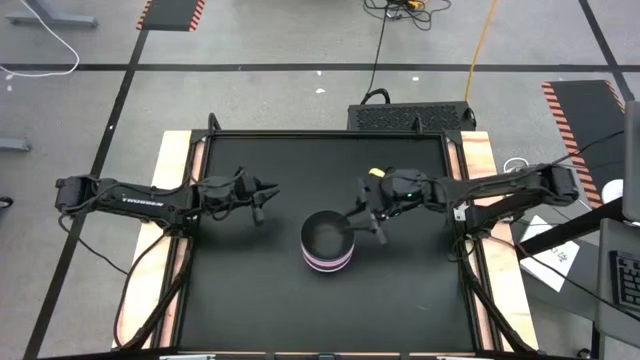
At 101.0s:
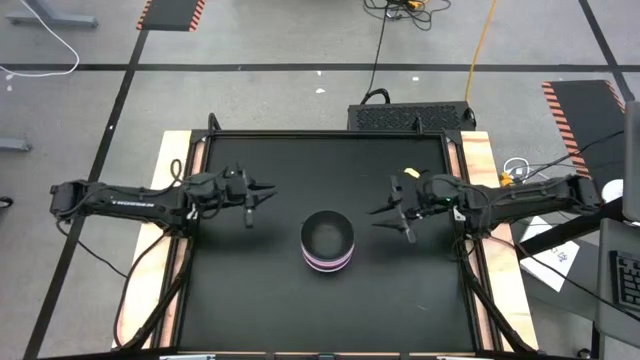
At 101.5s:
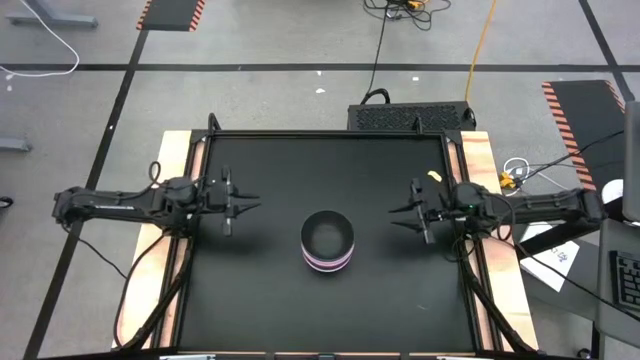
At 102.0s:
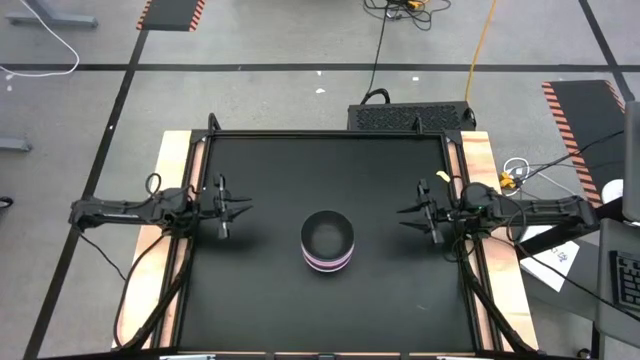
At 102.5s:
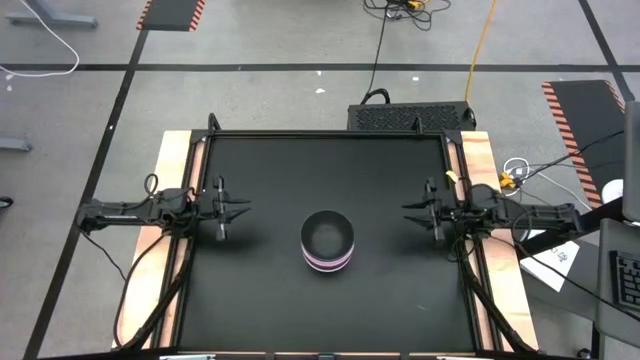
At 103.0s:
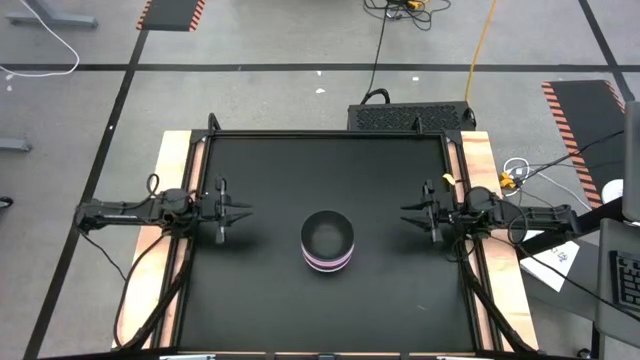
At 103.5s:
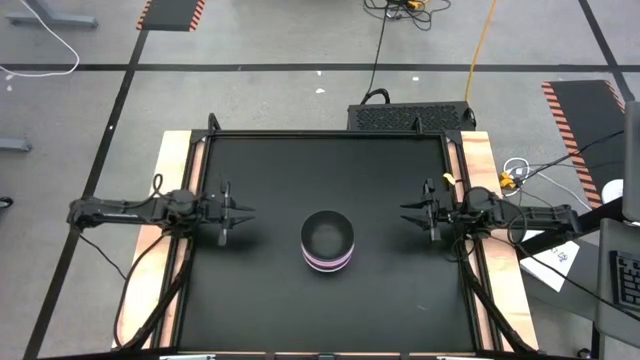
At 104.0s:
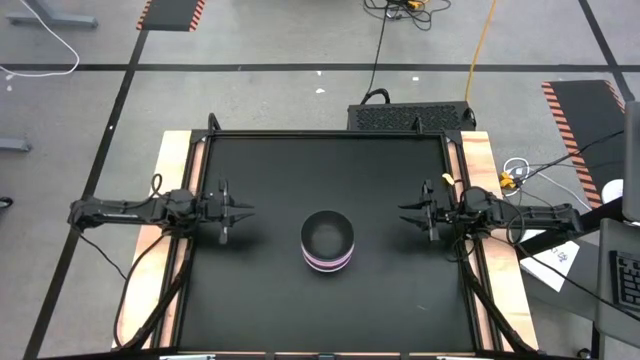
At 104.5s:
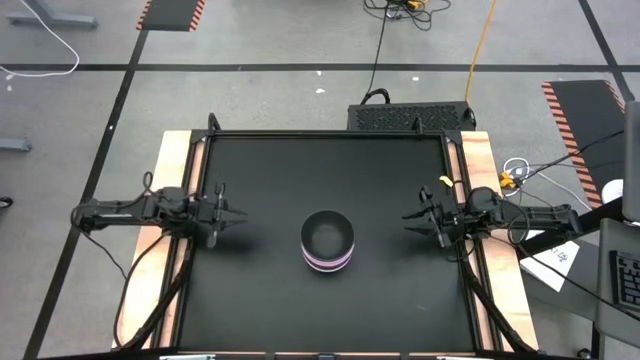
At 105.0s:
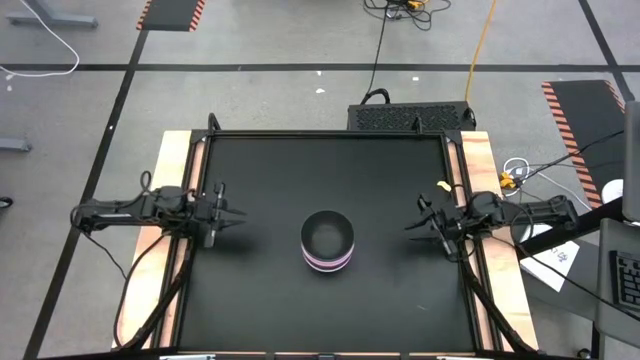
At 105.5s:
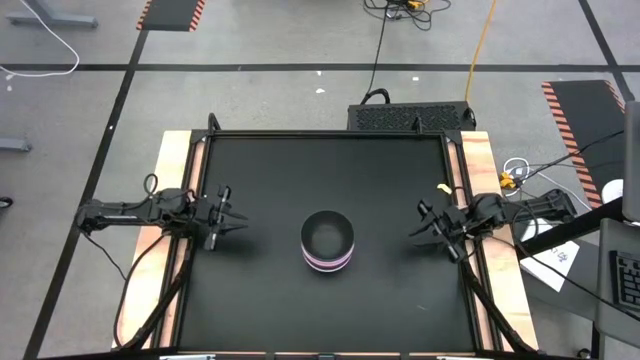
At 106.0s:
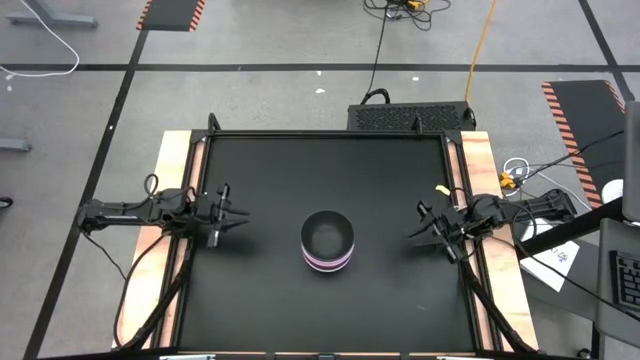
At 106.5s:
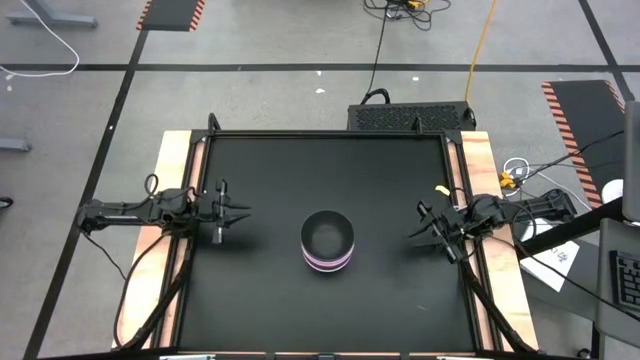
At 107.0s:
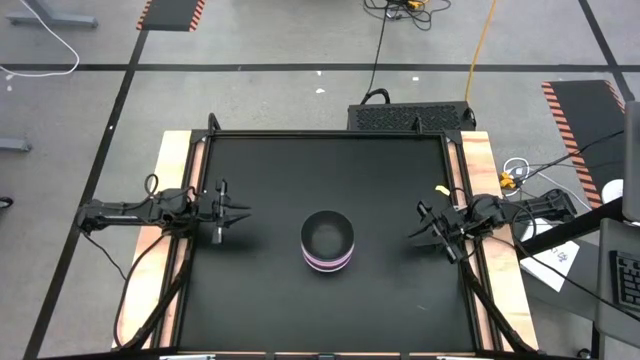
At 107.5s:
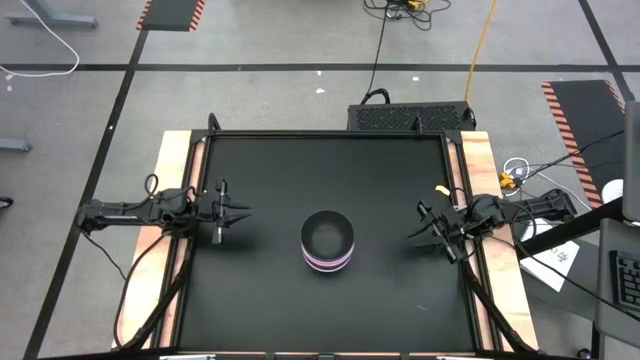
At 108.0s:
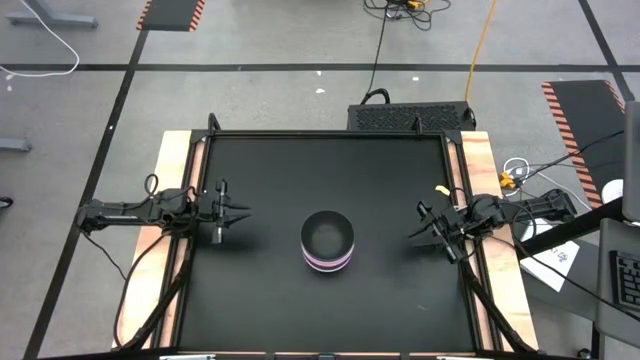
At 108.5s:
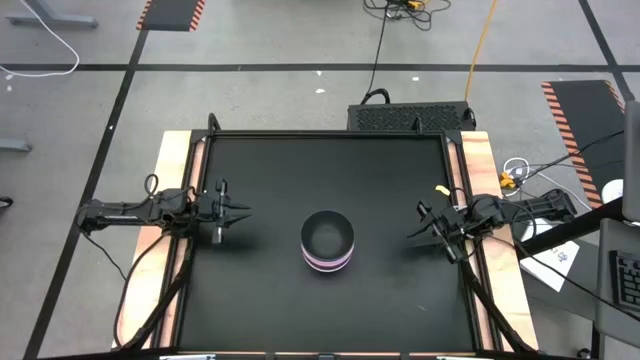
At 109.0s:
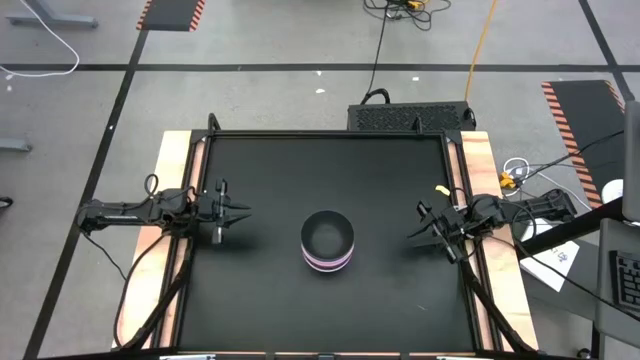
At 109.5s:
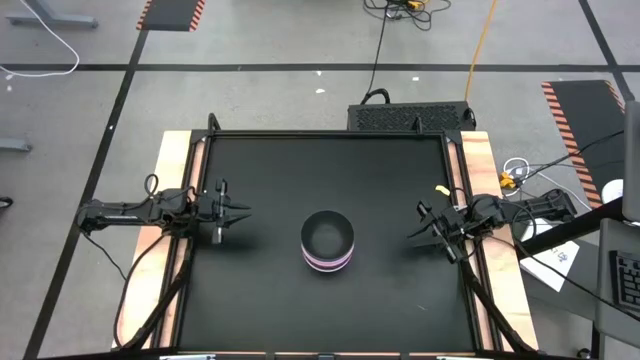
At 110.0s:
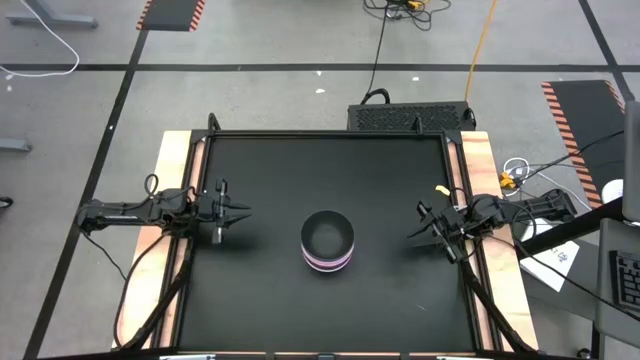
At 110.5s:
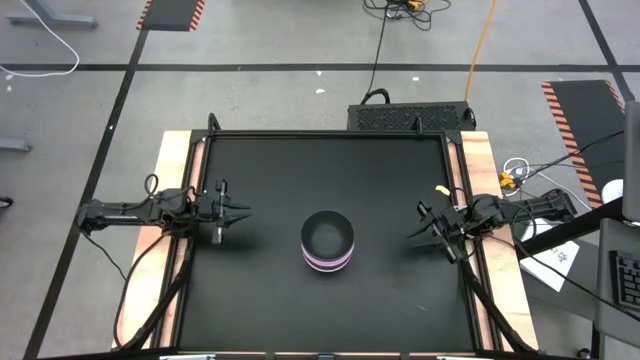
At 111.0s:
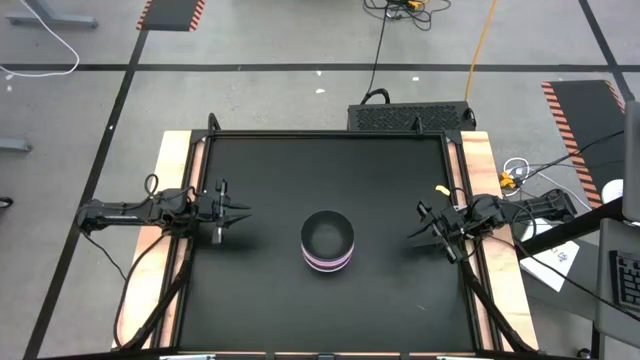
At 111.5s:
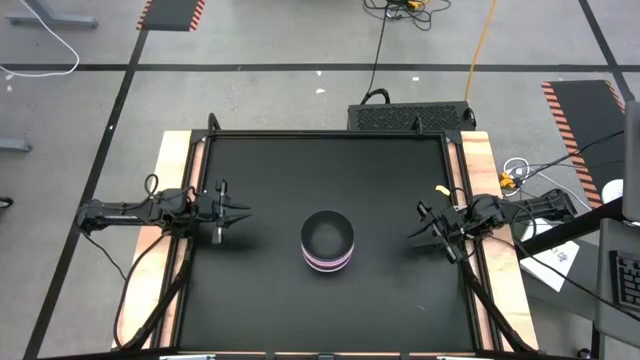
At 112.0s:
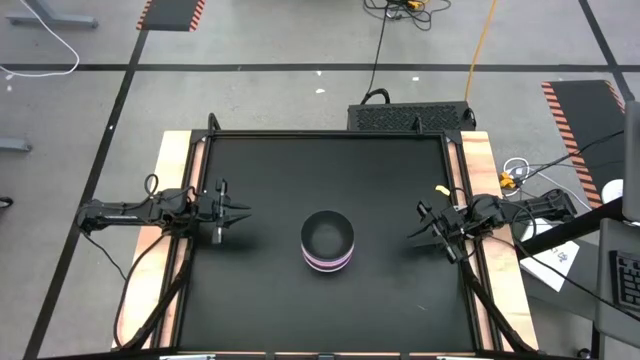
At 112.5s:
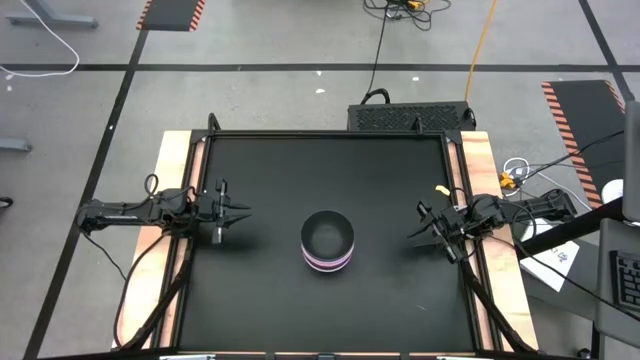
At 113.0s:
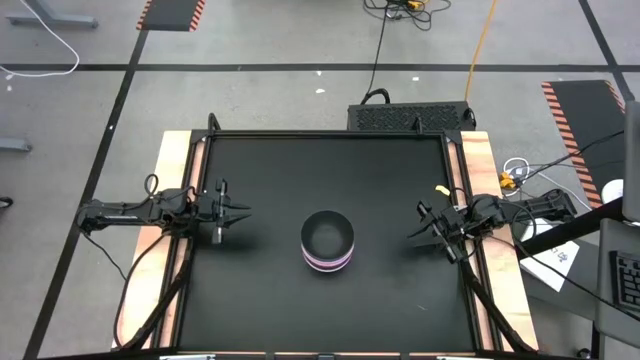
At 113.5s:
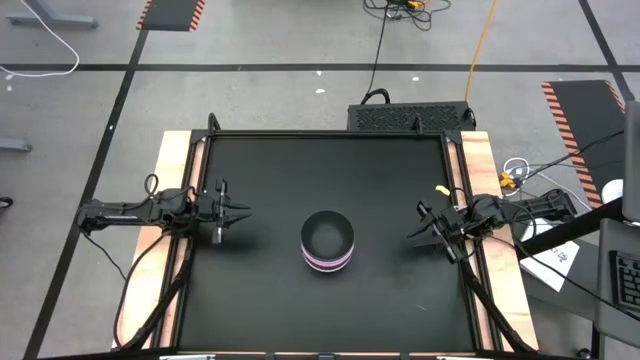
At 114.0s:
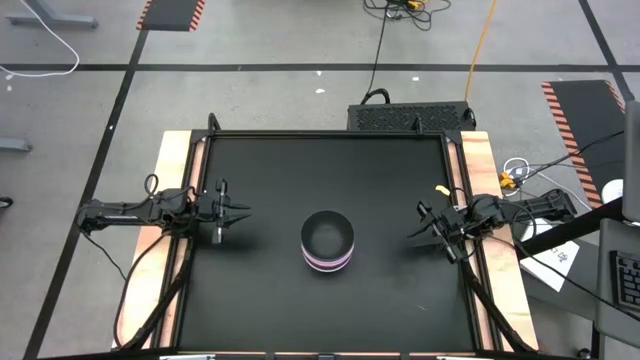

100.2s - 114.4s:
Task: Nest bowls inside each other
Return to Home Position

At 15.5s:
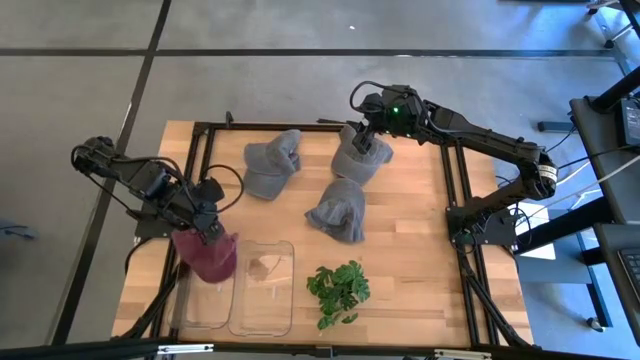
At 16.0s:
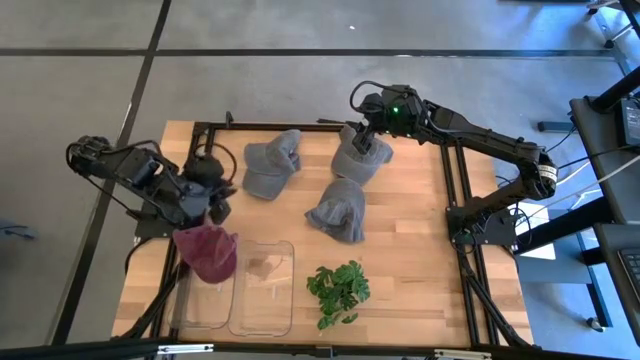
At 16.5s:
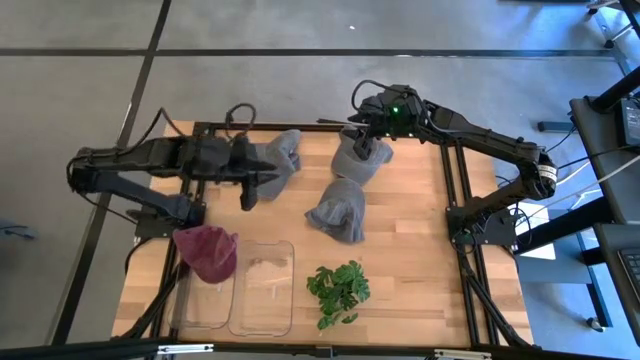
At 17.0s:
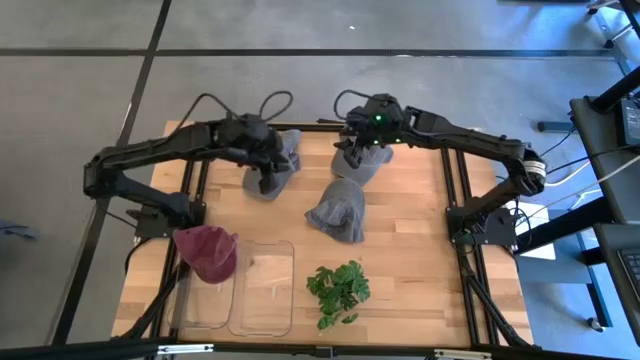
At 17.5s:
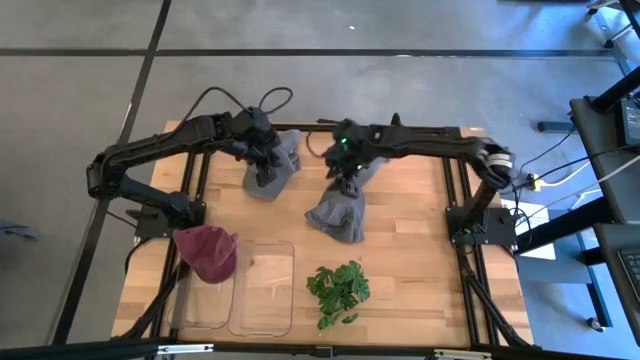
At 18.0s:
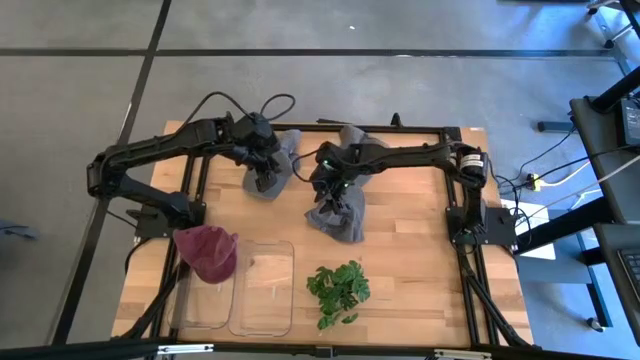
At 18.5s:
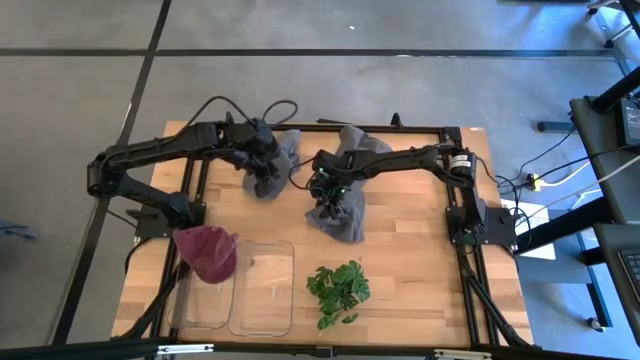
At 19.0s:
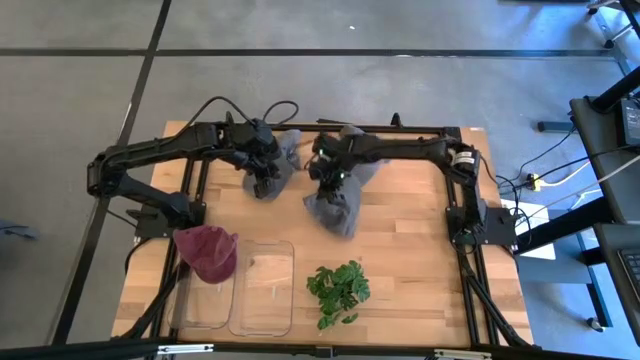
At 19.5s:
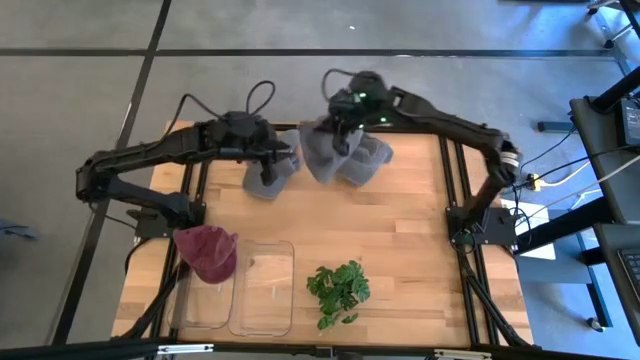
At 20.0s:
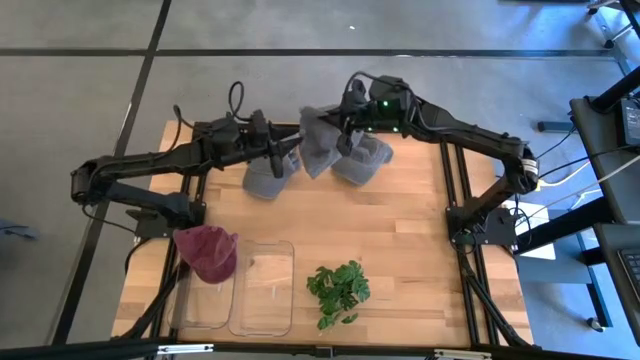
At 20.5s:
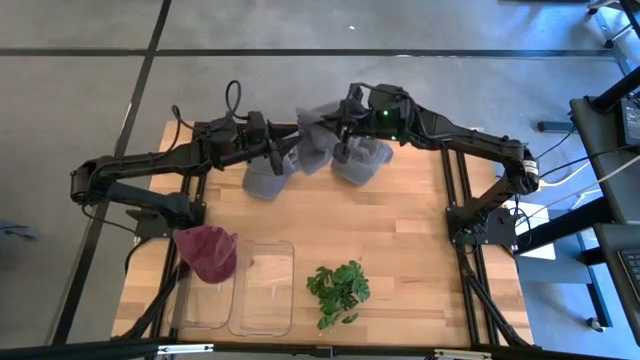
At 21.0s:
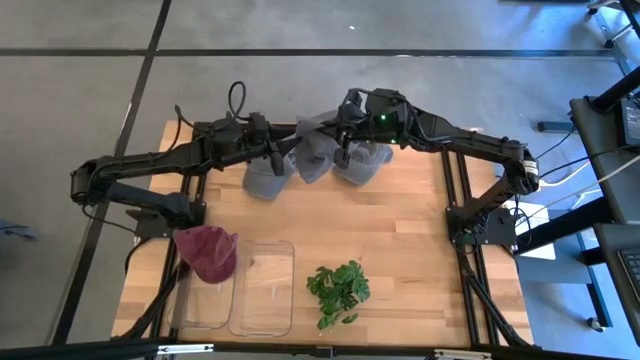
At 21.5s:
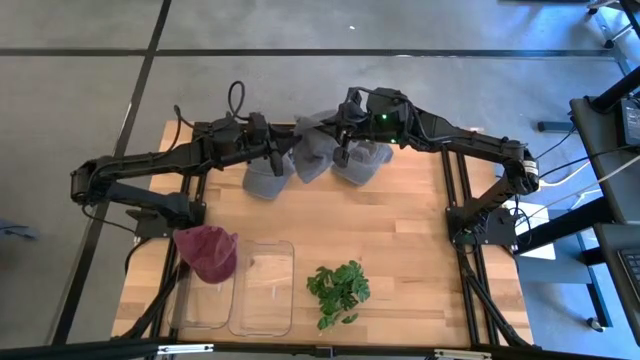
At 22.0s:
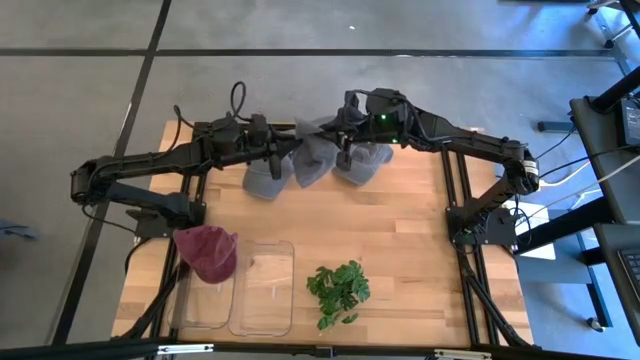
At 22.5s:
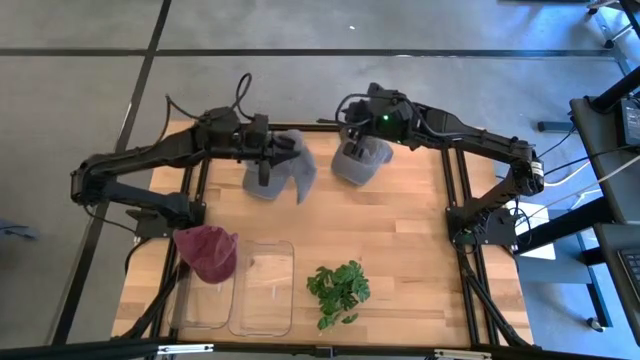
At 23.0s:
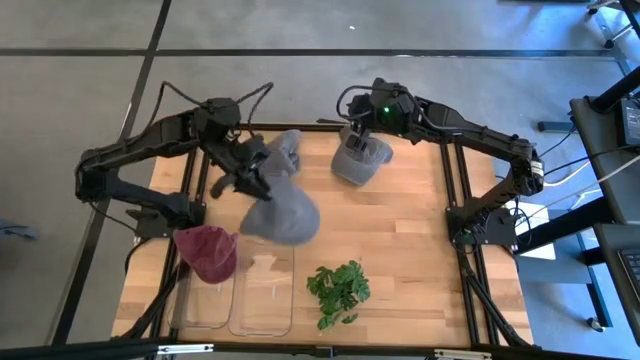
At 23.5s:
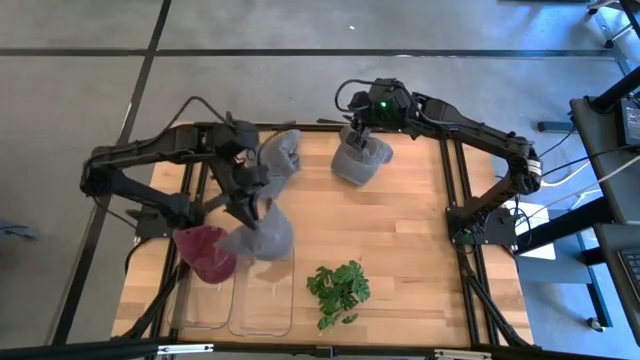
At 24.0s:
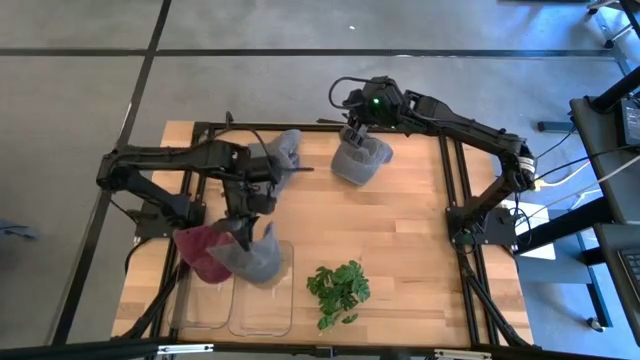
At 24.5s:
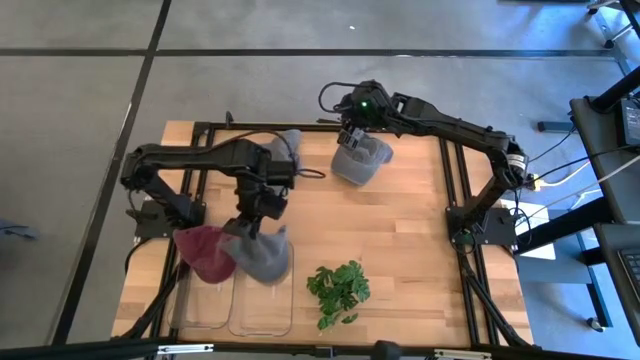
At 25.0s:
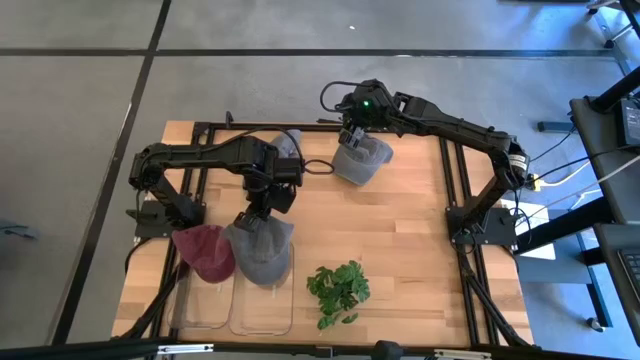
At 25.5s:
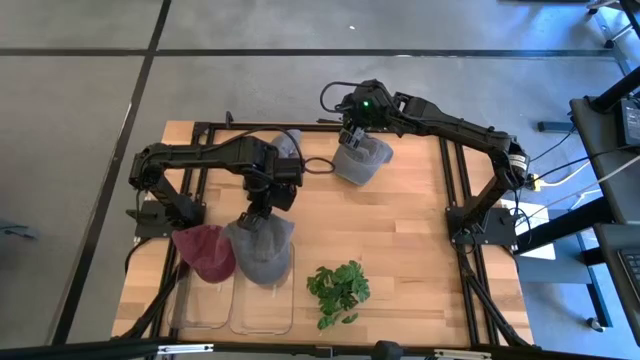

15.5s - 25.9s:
Task: Pick & Place hat
Put the gray cap into the right transparent bin
